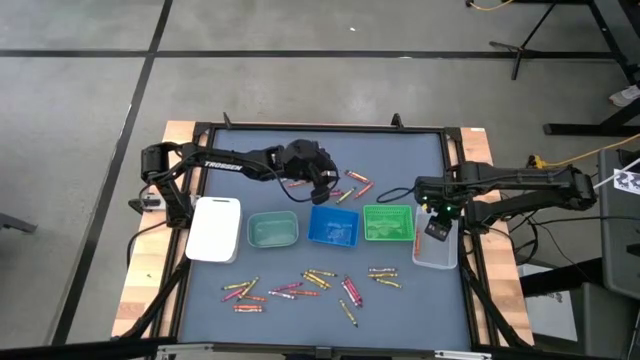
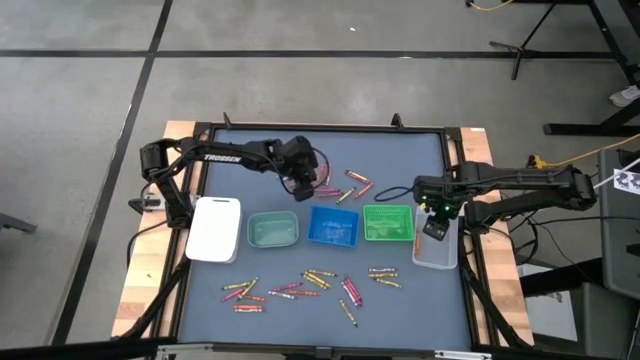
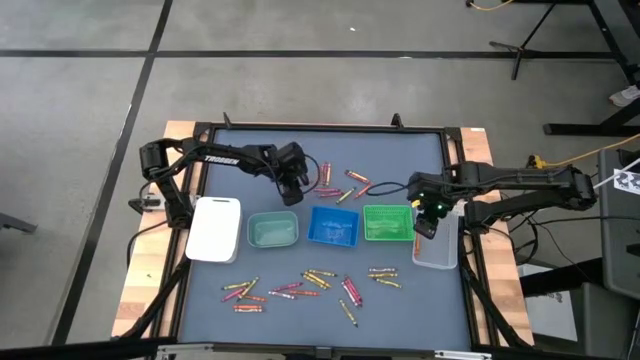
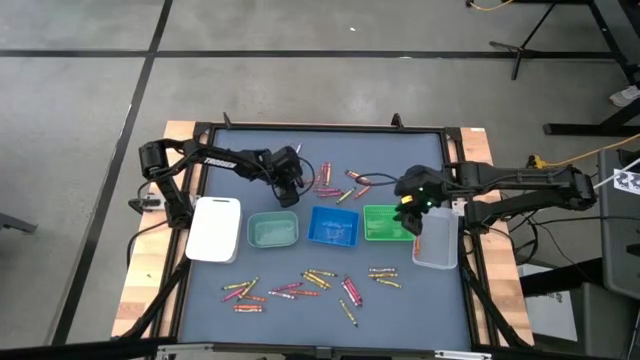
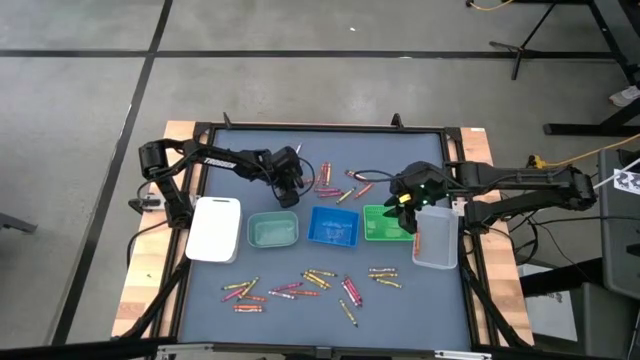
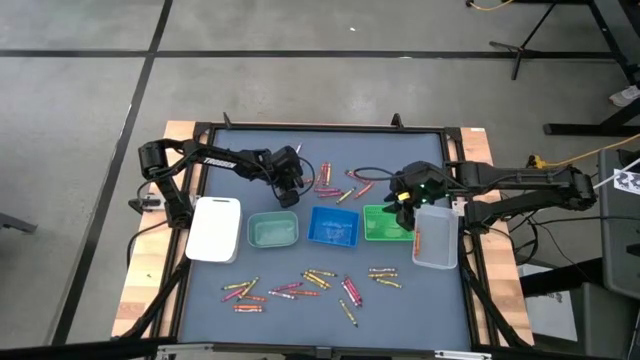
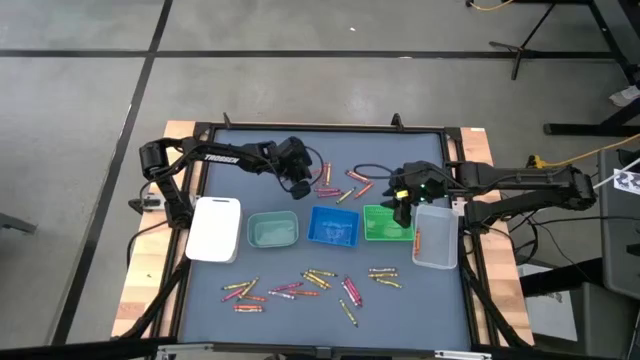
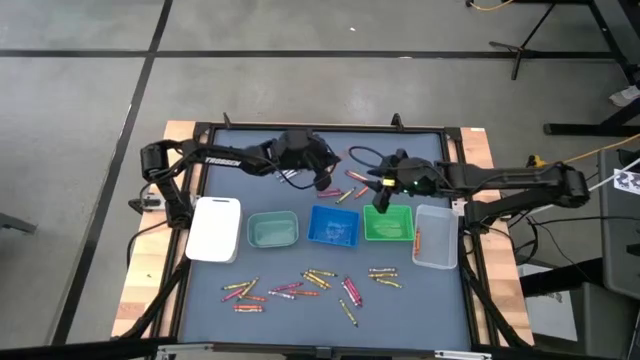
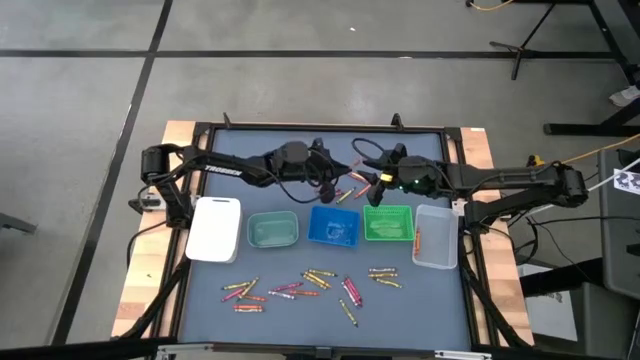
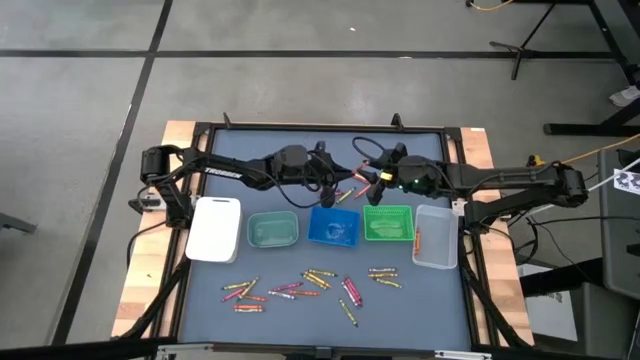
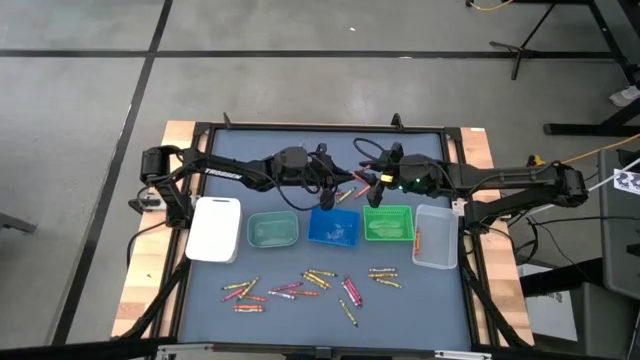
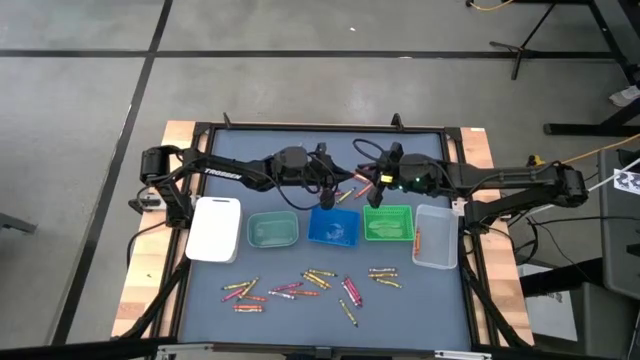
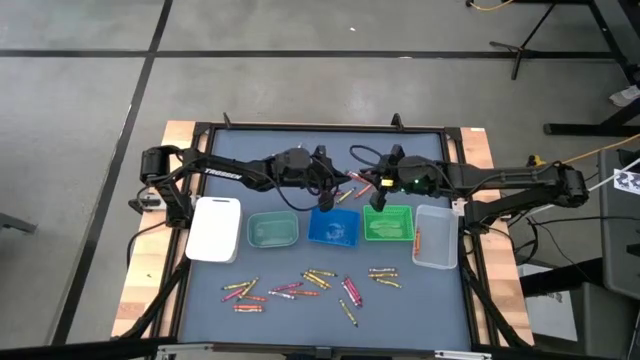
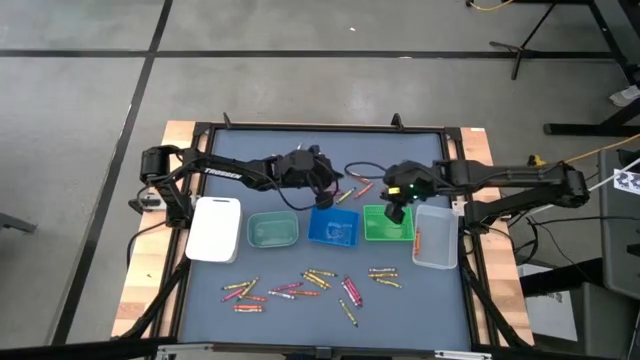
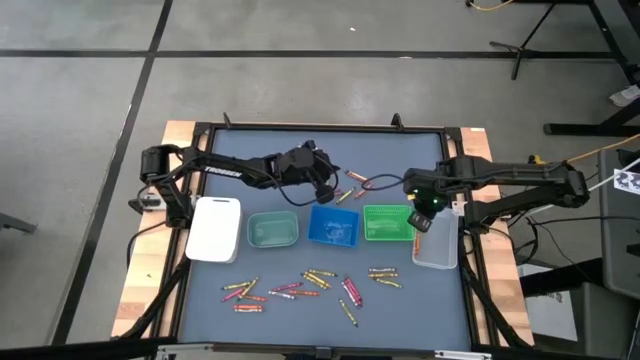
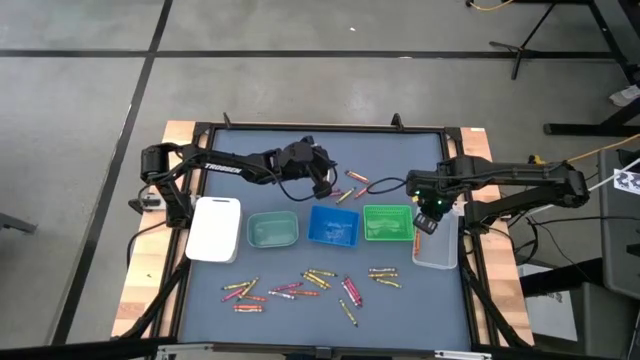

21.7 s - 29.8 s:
Task: Sort crayons
Put the orange crayon into the transparent bin

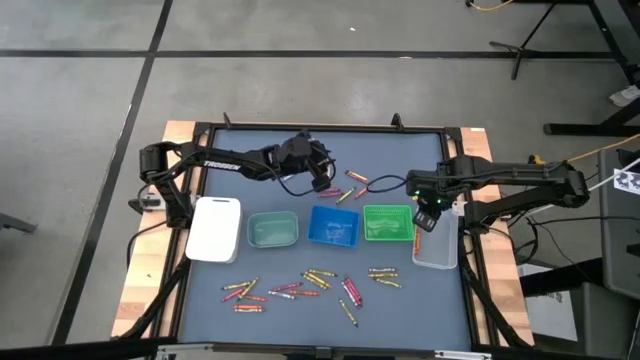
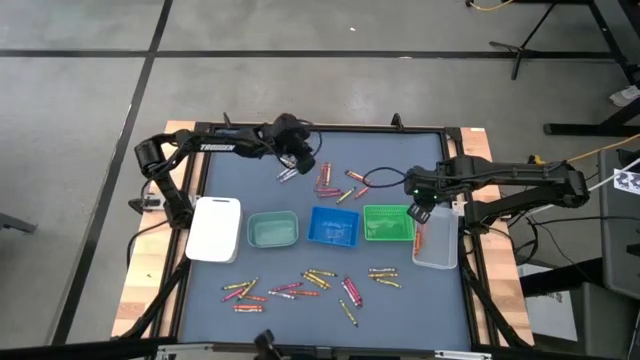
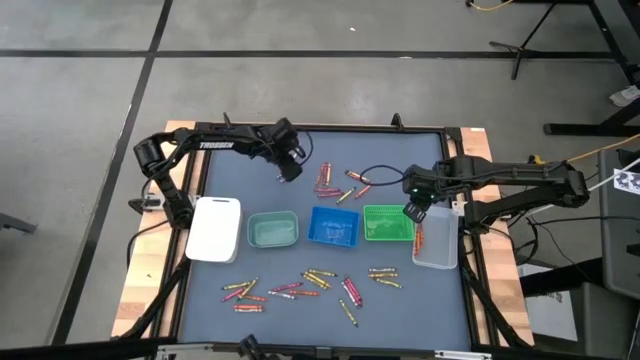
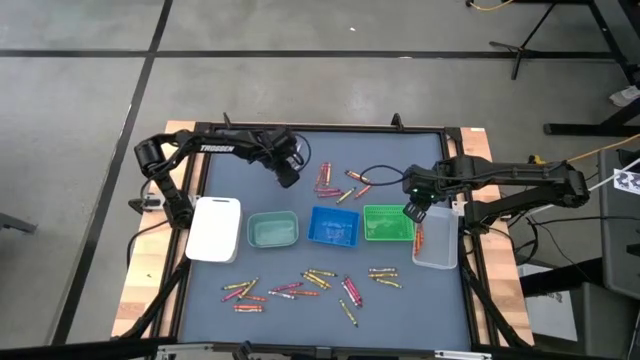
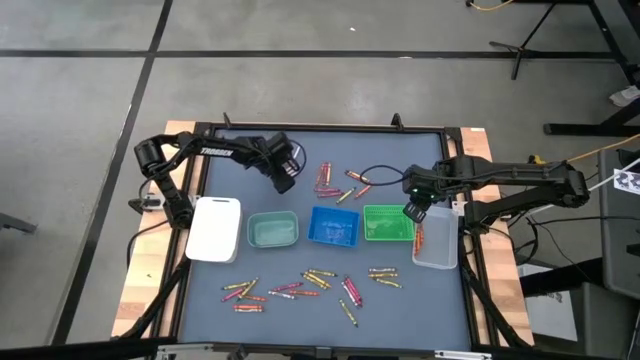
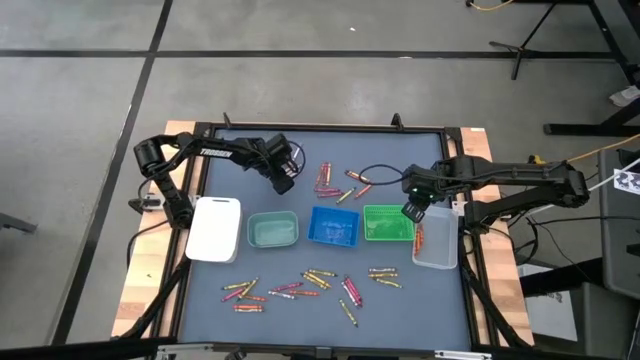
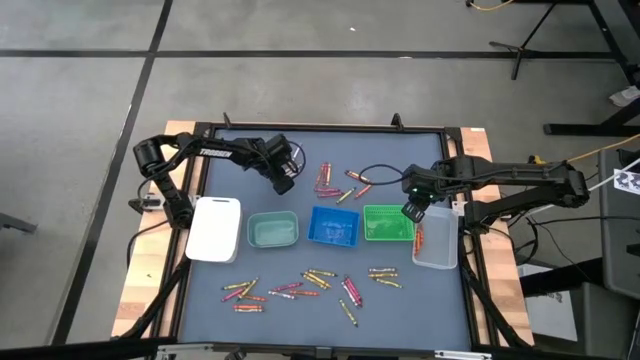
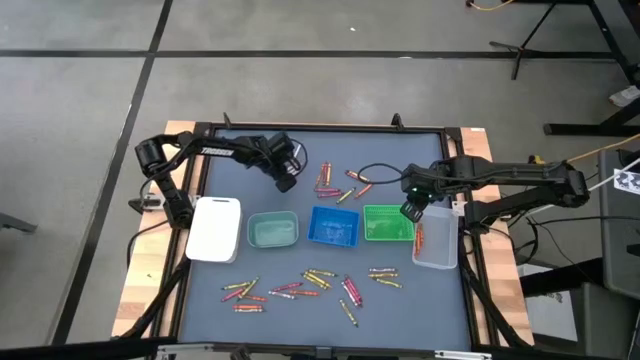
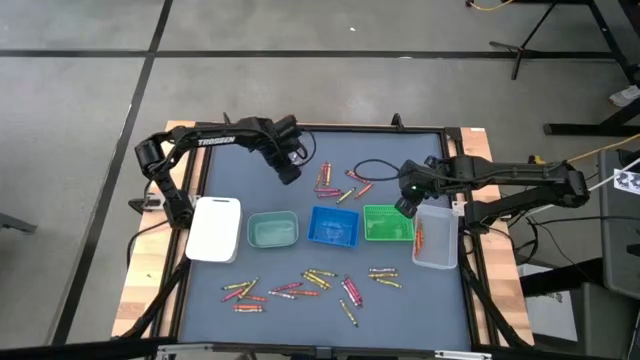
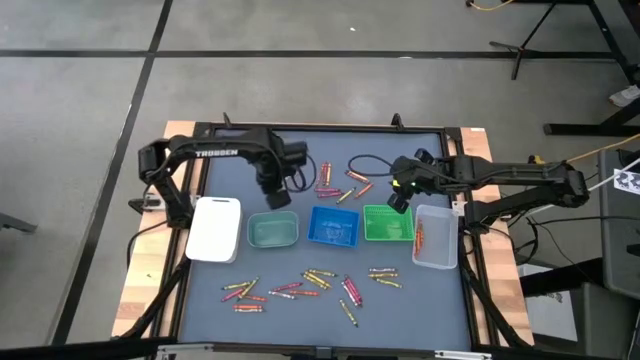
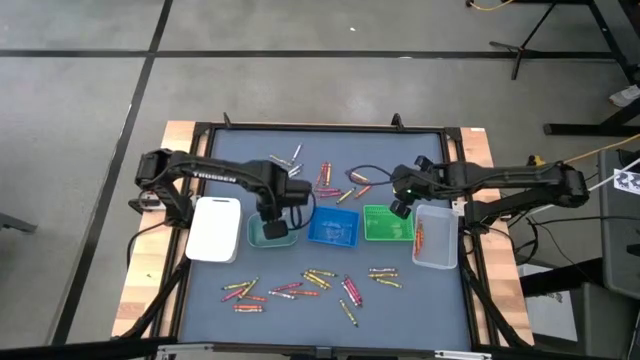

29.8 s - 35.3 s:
Put the gray crayon into the light green bin

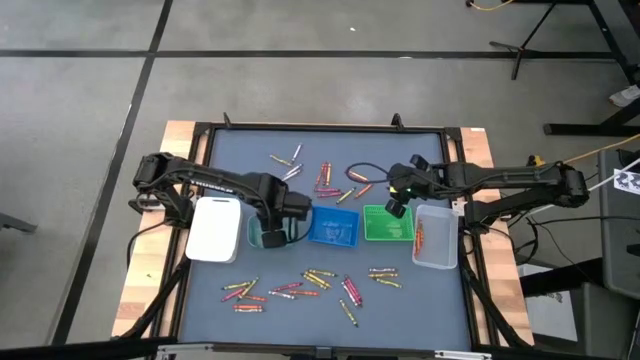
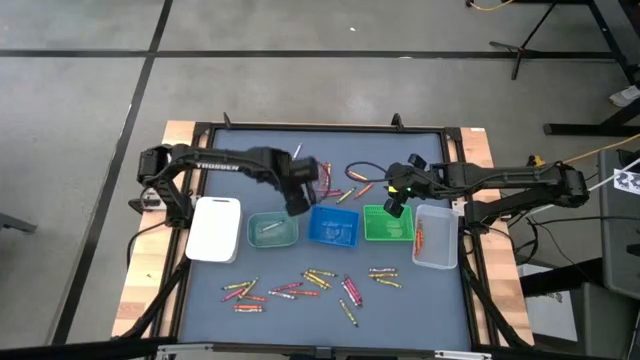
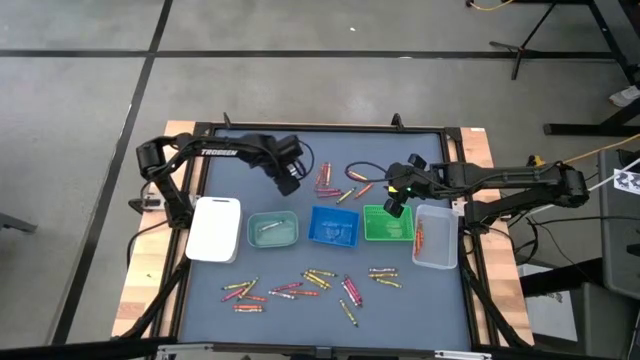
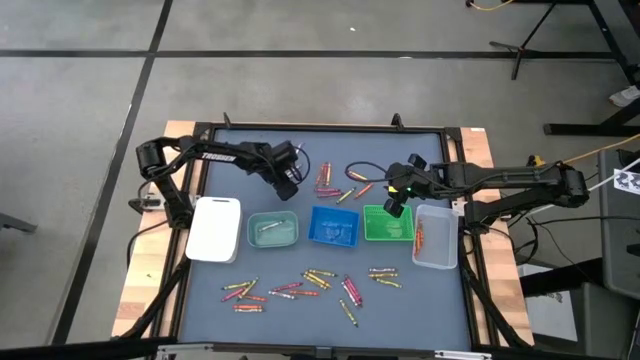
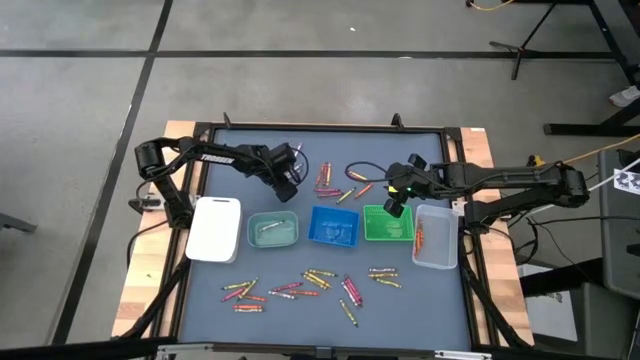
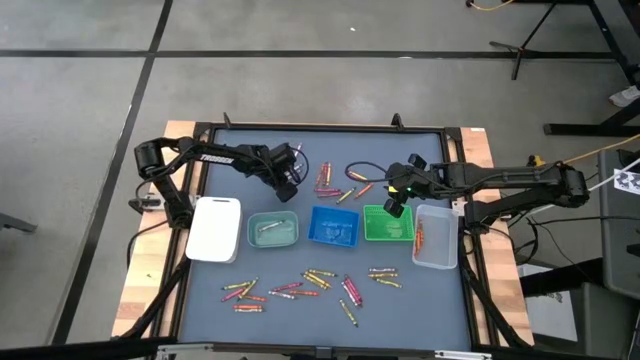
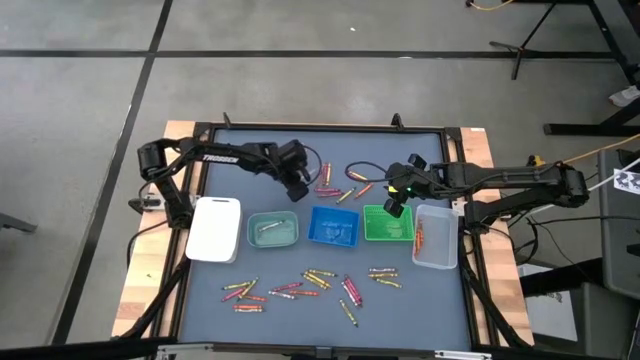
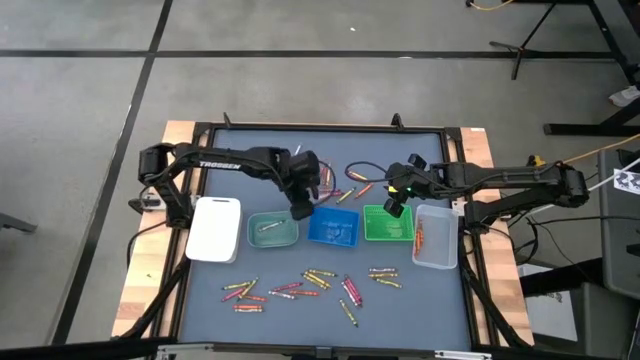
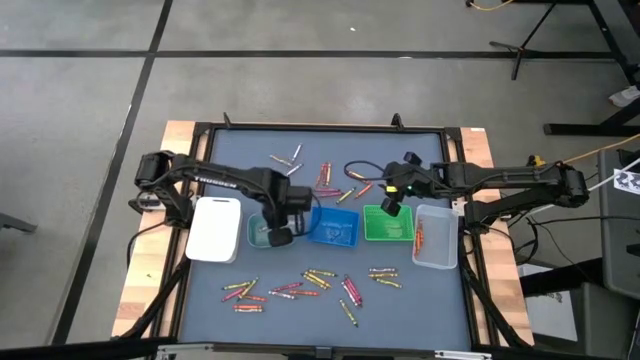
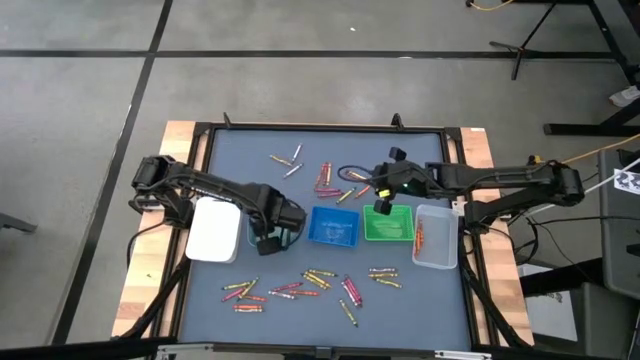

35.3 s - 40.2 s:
Put the gray crayon into the light green bin

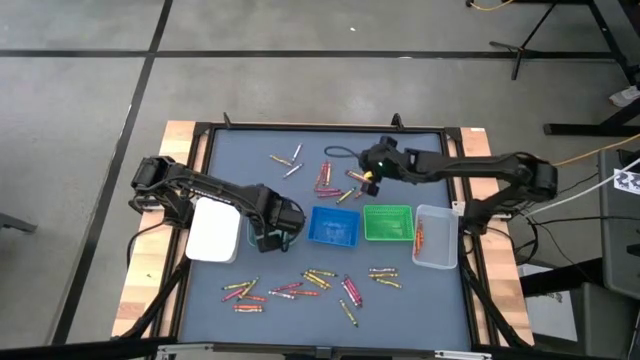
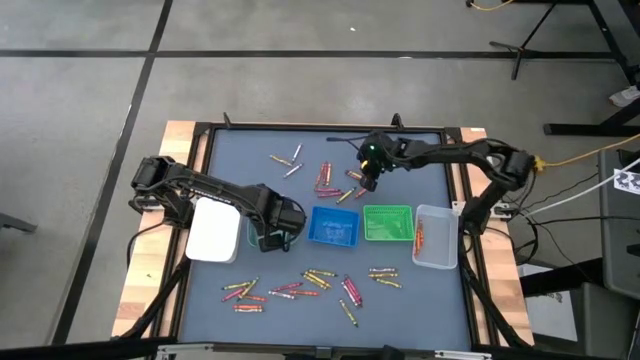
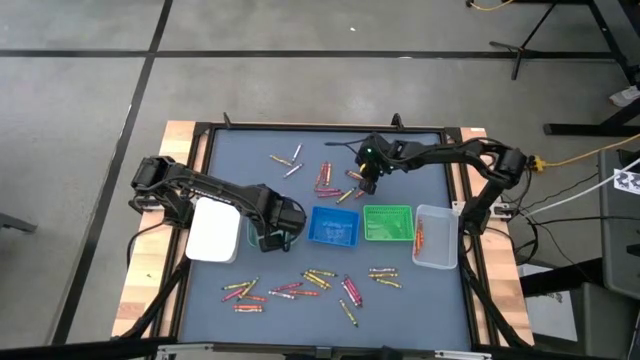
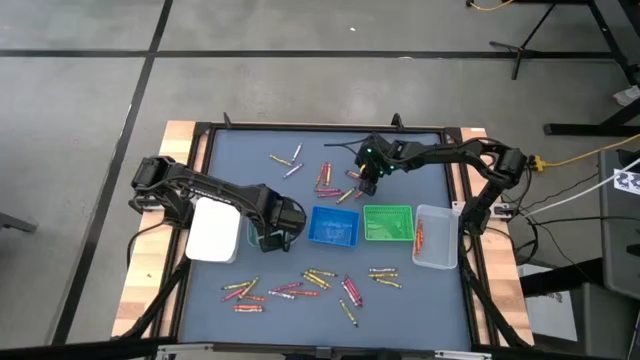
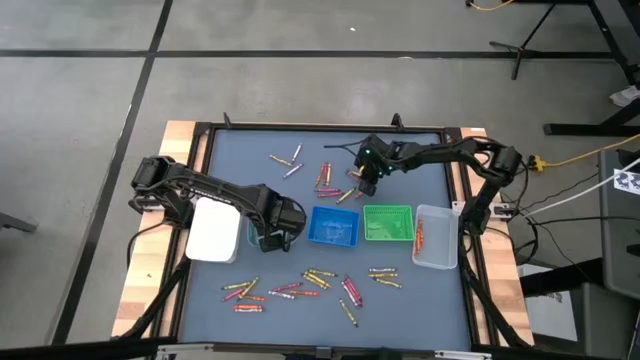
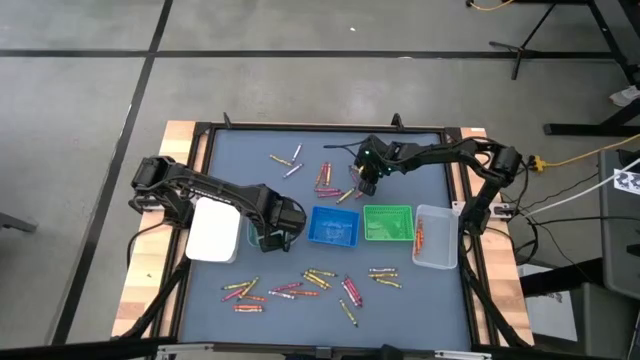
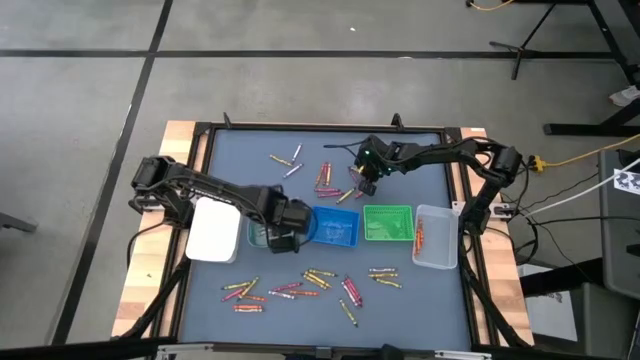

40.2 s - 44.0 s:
Put the green crayon into the green bin
